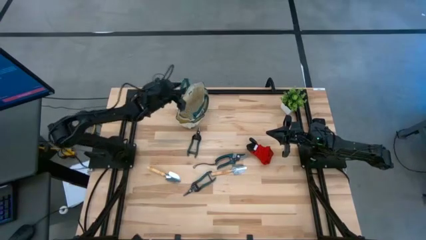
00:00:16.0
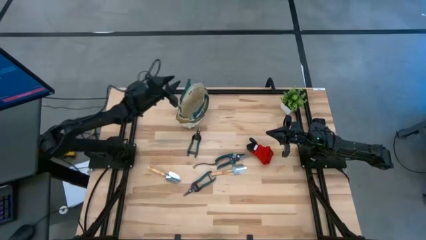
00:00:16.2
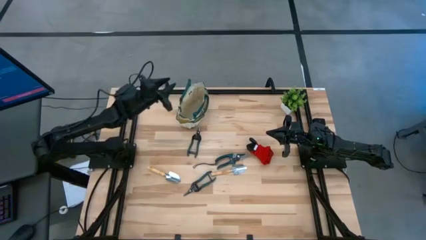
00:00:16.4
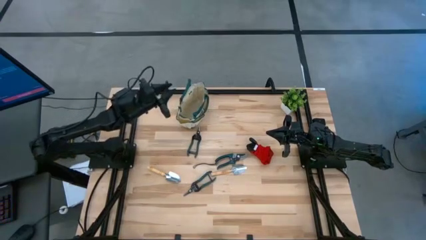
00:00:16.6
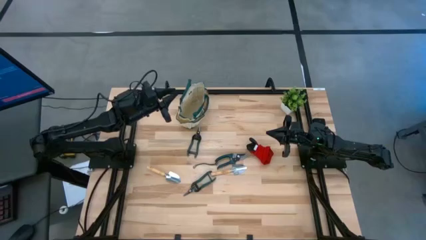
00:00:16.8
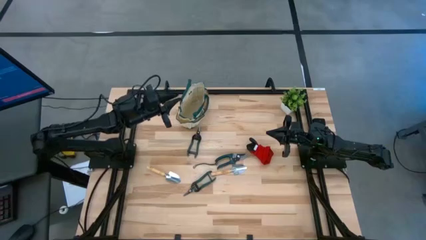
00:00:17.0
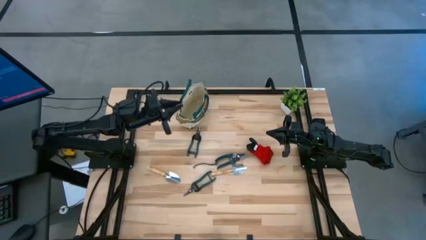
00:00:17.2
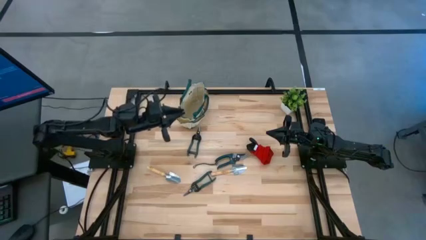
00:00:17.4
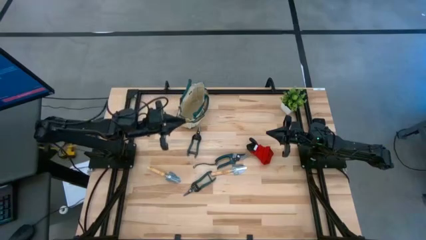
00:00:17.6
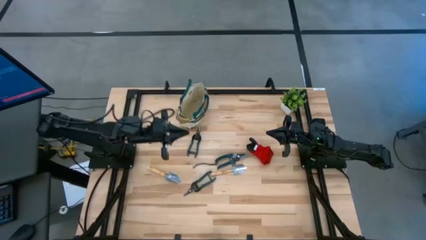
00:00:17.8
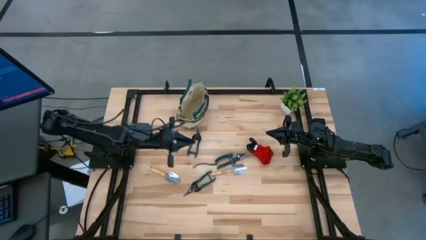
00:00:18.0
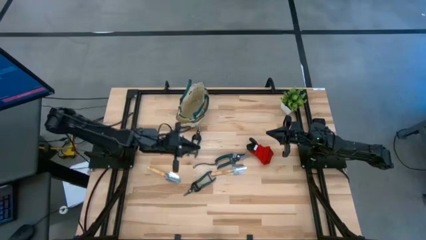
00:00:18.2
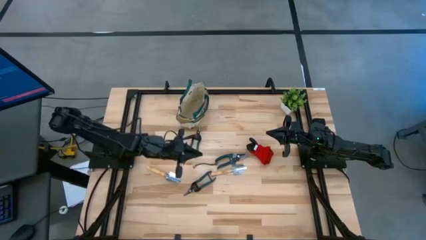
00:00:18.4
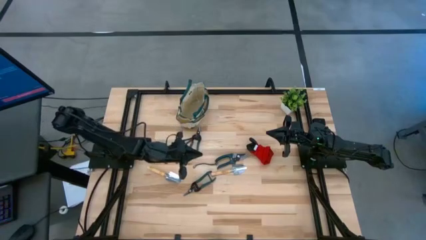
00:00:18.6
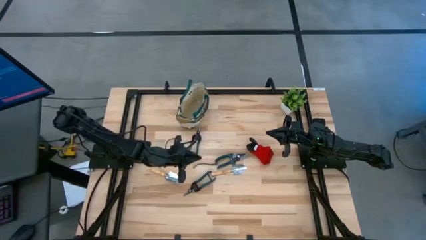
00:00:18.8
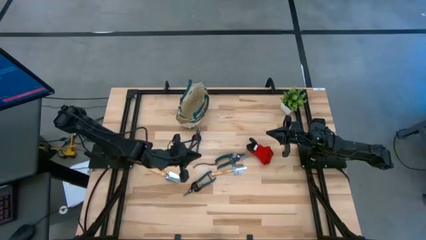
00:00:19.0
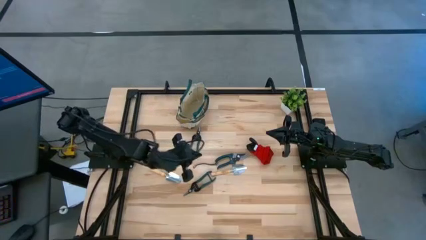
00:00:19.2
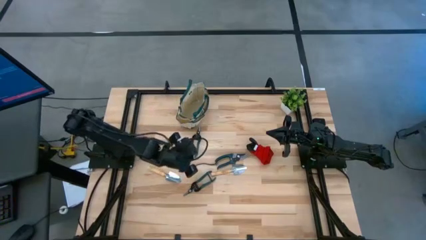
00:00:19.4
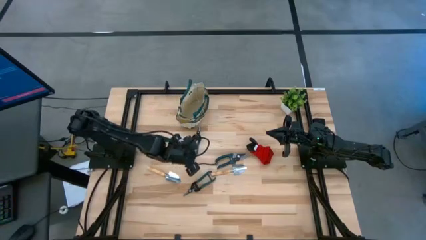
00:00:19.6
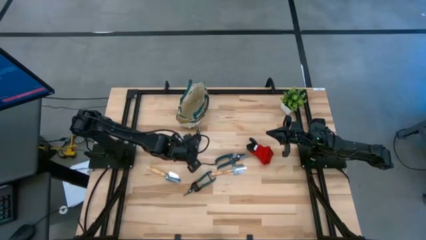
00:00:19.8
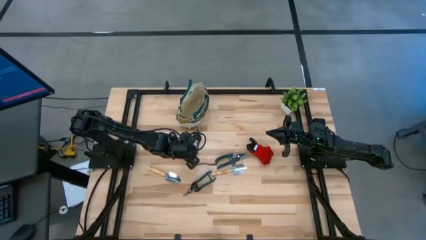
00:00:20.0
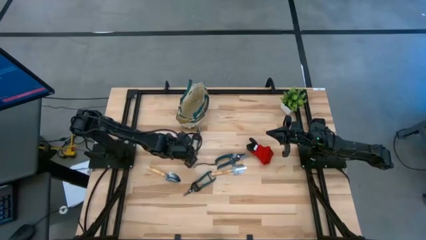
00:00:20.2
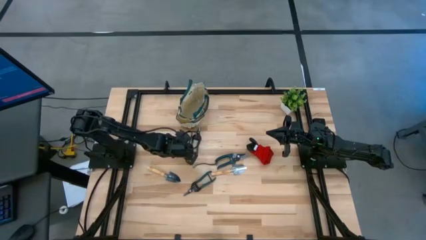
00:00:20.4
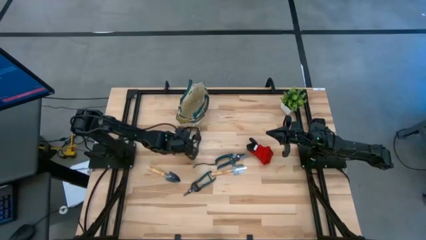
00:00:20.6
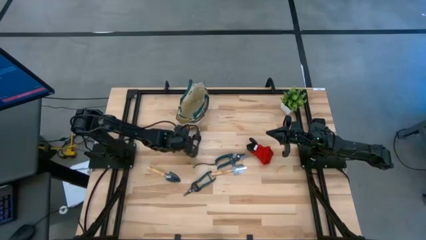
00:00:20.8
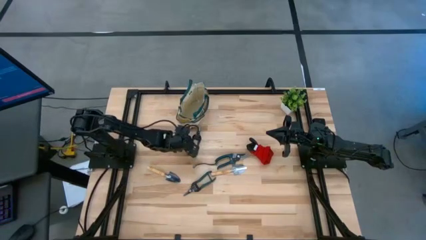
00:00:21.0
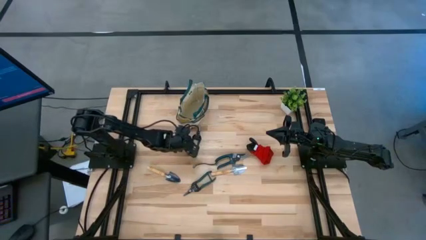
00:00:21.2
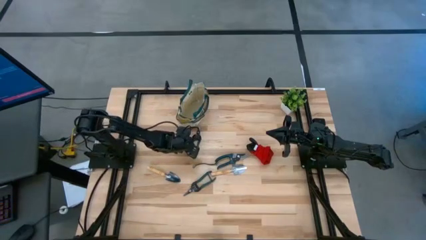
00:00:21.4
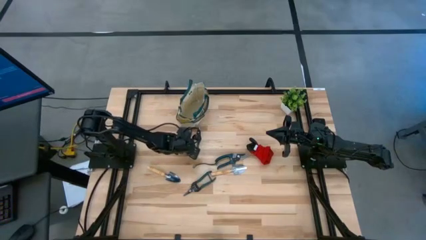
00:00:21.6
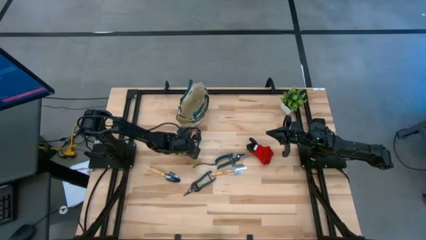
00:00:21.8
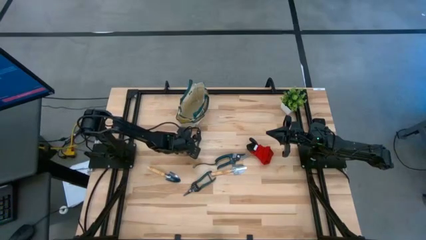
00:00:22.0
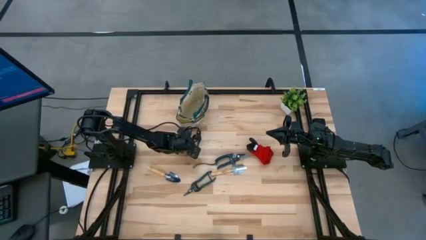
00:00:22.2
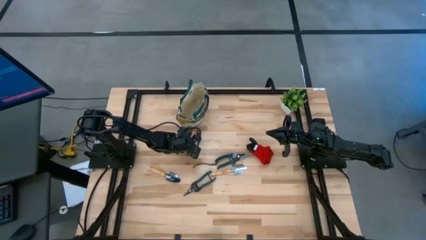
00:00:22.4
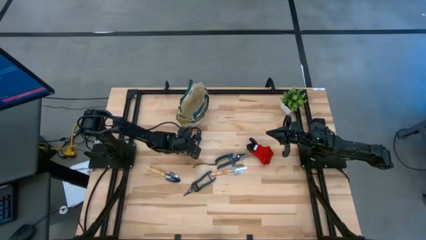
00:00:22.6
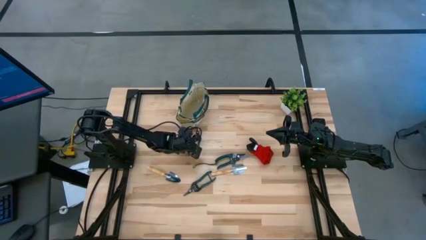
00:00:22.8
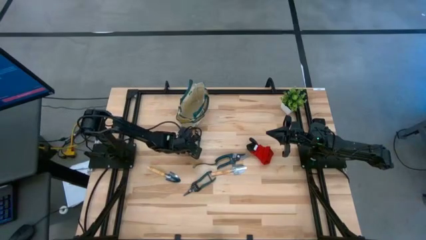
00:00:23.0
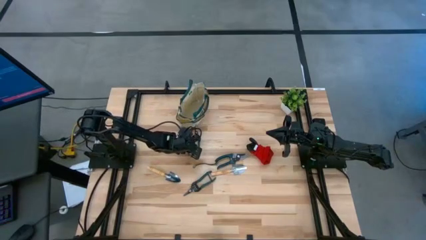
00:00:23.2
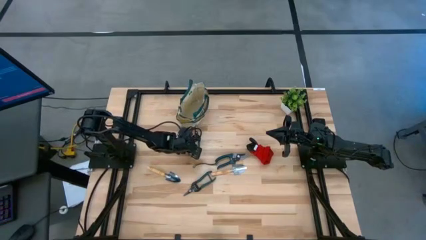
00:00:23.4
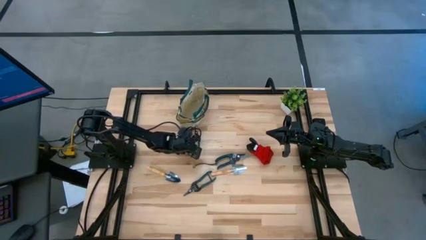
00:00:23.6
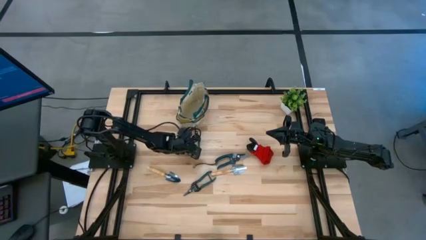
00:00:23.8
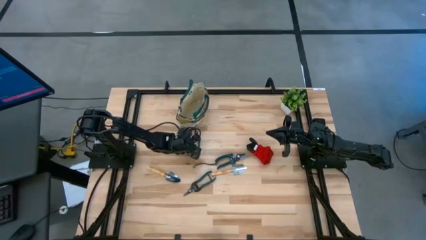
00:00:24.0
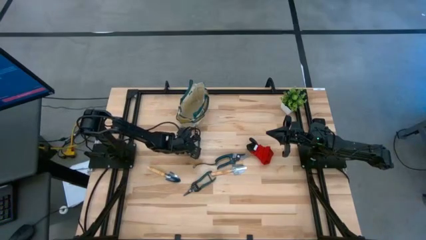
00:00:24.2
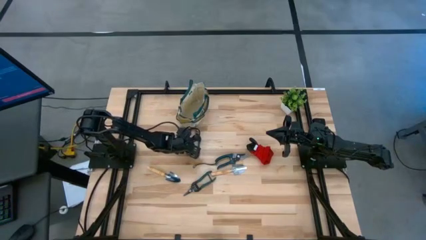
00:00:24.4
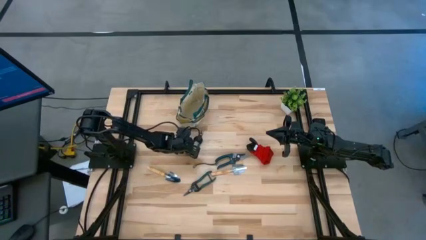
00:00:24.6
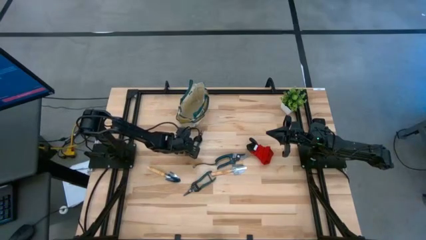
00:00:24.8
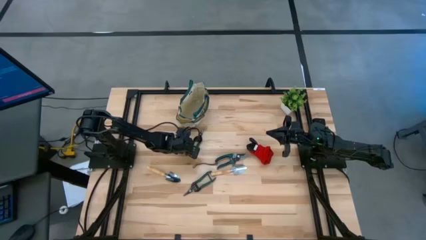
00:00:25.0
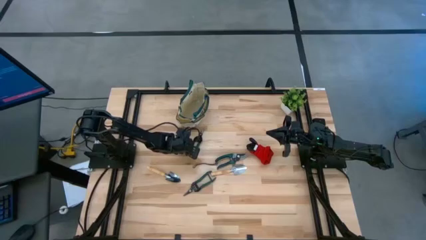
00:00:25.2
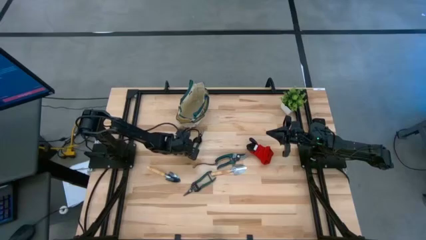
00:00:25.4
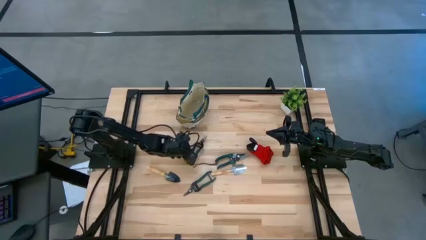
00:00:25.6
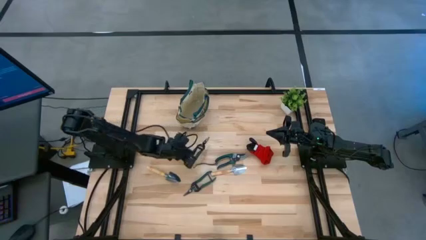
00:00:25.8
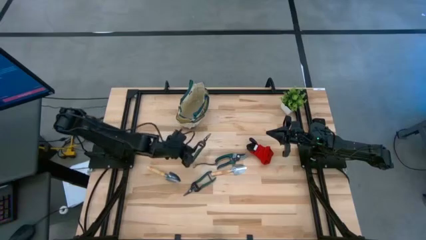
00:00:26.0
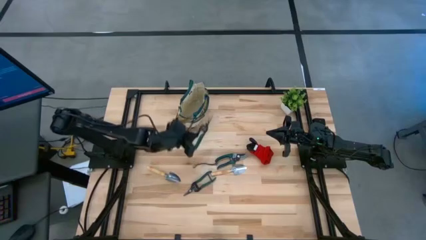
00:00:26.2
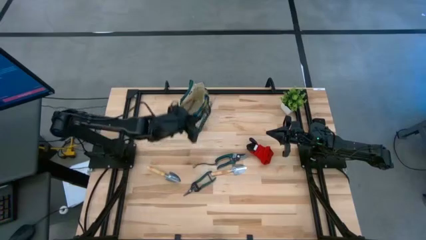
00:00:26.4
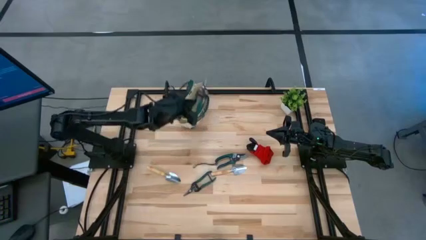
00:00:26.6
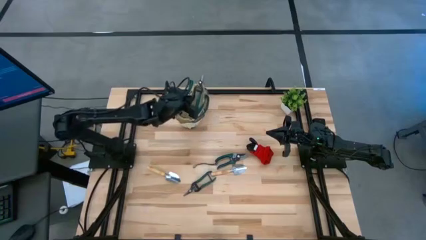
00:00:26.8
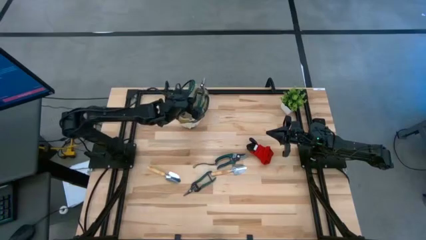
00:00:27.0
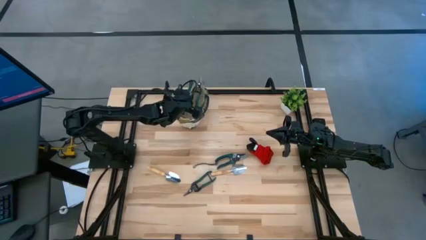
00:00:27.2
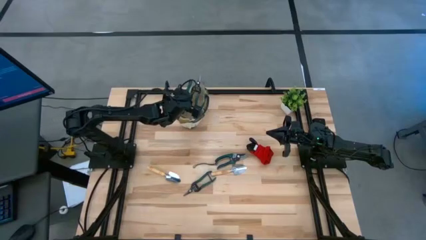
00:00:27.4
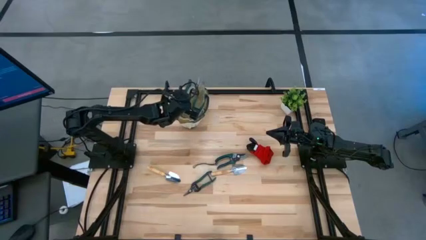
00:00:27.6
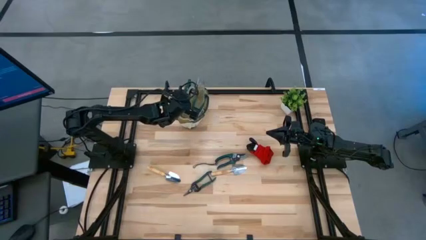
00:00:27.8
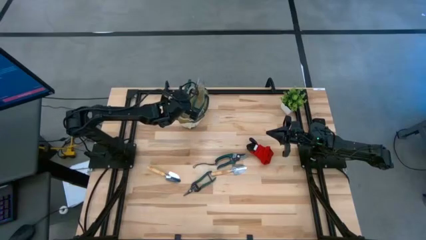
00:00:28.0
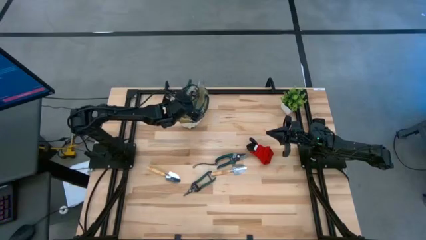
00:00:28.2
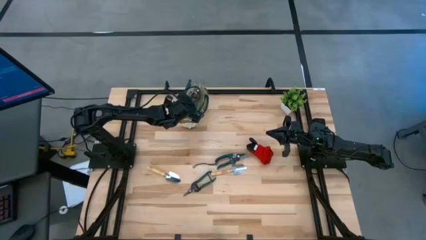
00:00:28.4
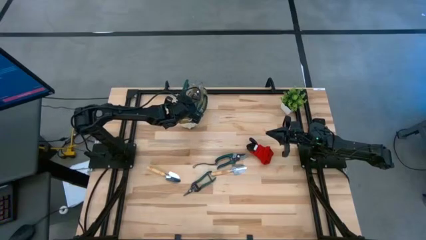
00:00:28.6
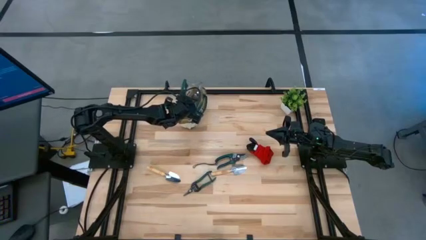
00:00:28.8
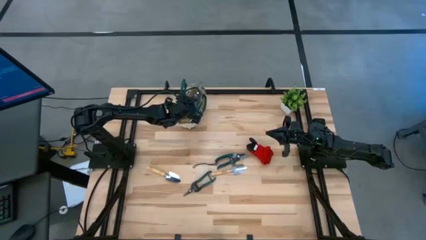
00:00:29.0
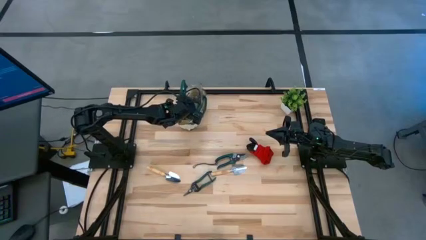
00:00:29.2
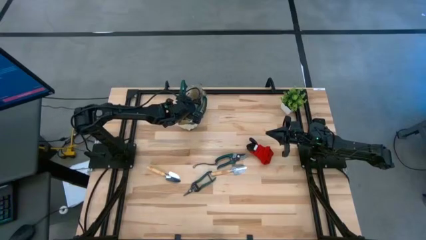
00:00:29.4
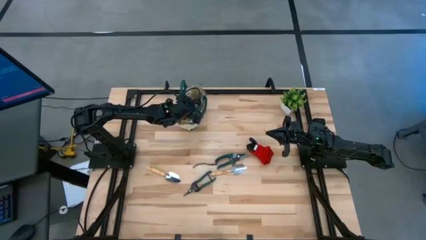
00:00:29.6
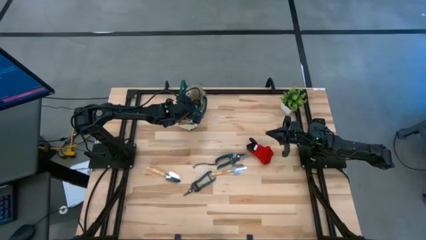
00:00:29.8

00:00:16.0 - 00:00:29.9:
Task: Pick & Place Garden tools in Gardening bag
Put the top green shear scissors into the brown gardening bag

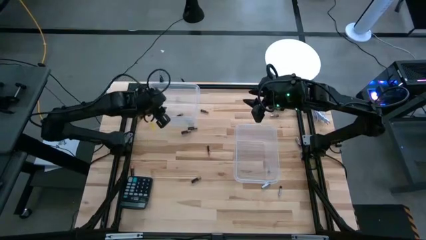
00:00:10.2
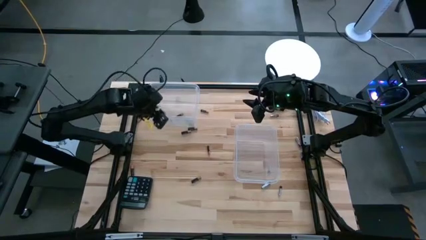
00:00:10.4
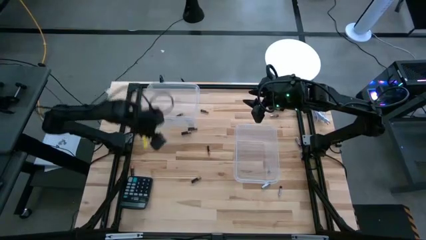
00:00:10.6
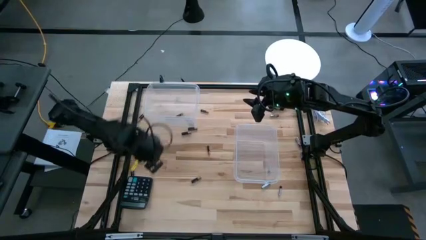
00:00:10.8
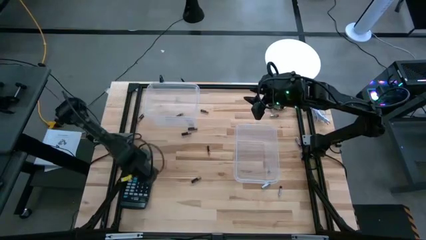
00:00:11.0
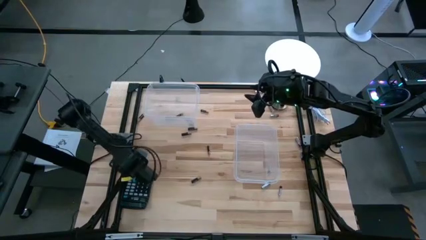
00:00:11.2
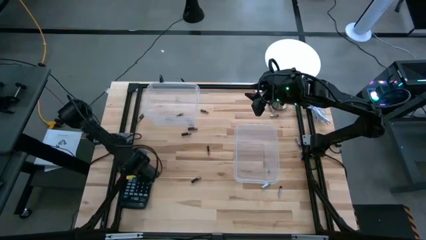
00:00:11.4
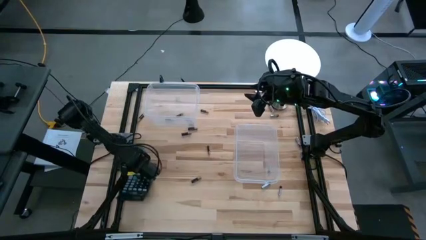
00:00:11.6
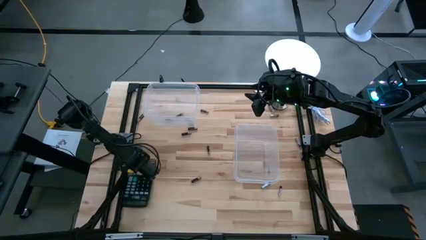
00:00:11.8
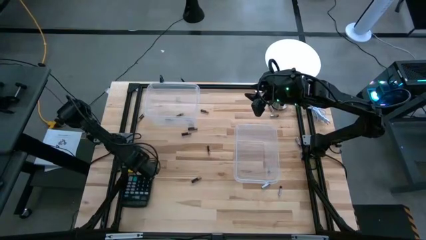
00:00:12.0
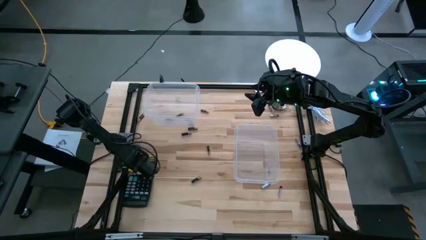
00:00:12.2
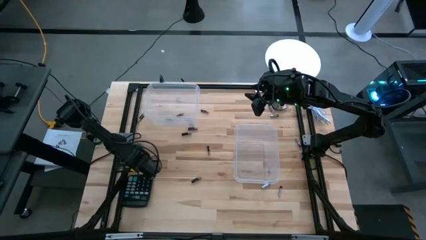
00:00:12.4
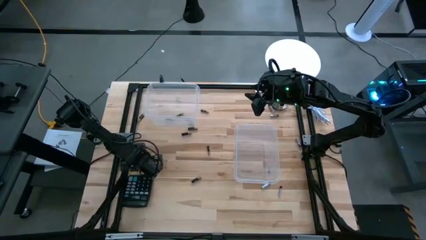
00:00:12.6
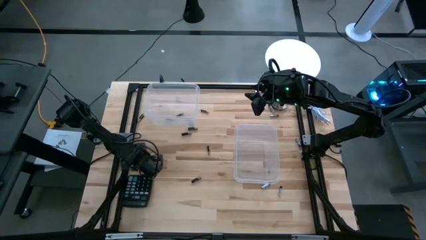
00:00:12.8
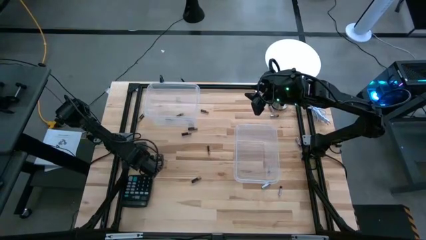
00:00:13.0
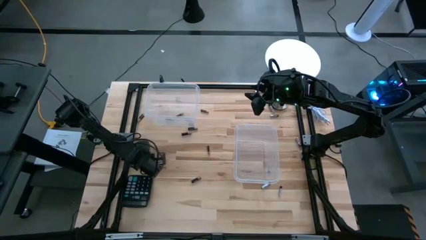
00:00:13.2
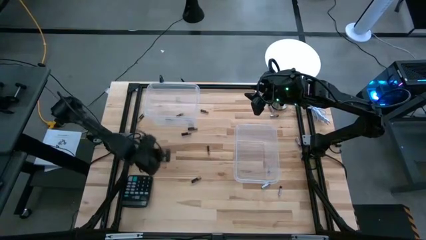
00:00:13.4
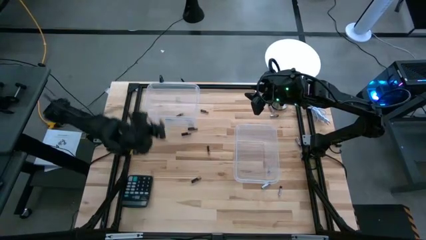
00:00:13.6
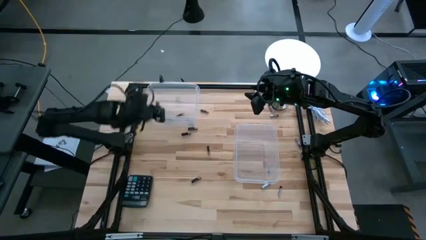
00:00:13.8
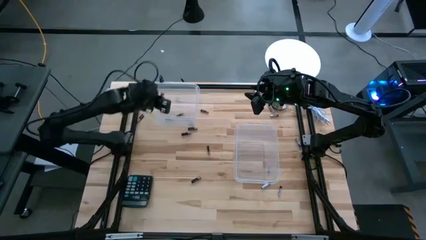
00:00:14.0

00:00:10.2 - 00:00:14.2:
Task: Sort batteries
Put the black battery into the left transparent bin
